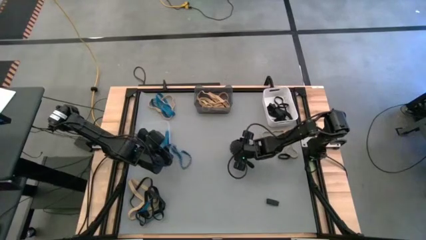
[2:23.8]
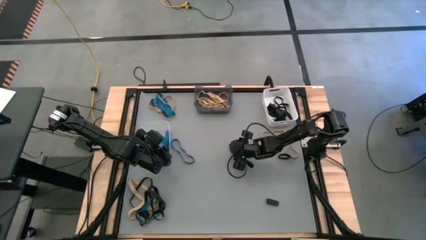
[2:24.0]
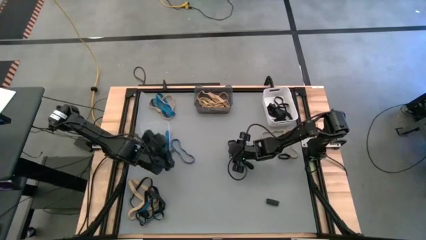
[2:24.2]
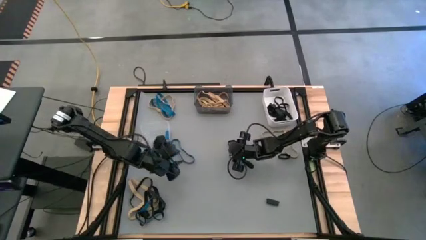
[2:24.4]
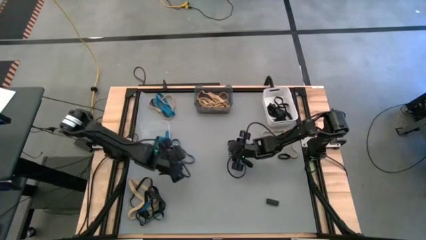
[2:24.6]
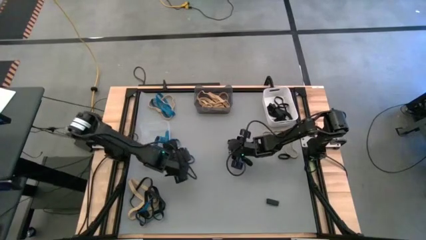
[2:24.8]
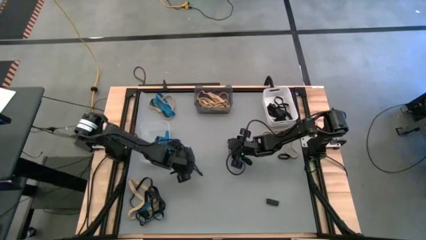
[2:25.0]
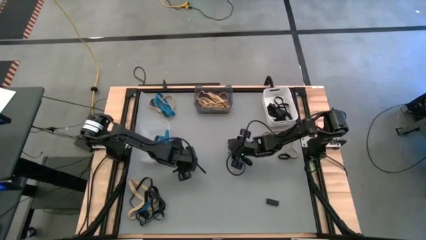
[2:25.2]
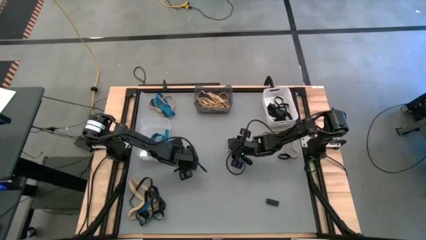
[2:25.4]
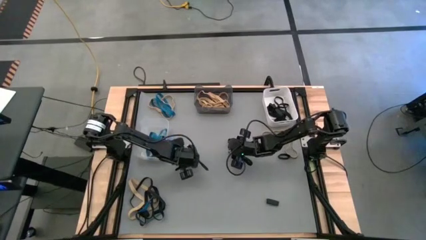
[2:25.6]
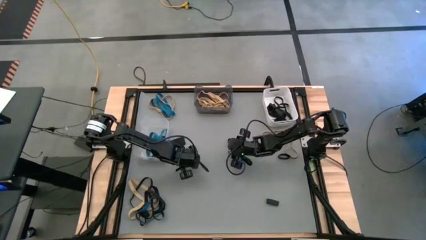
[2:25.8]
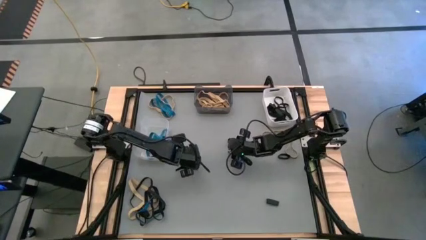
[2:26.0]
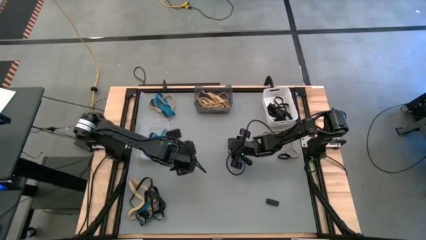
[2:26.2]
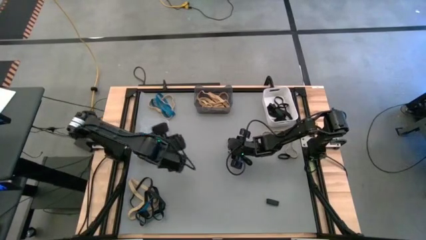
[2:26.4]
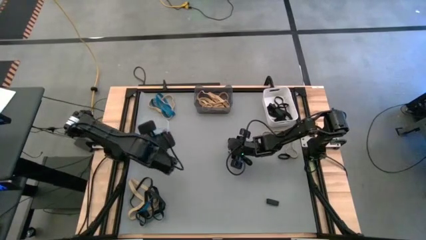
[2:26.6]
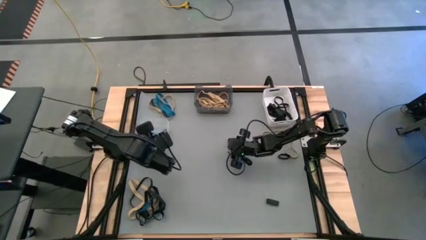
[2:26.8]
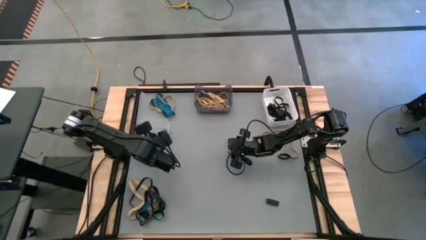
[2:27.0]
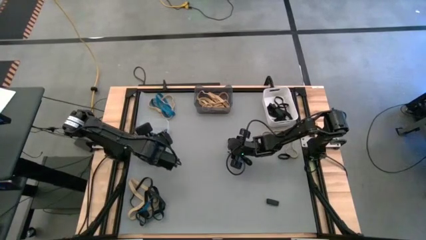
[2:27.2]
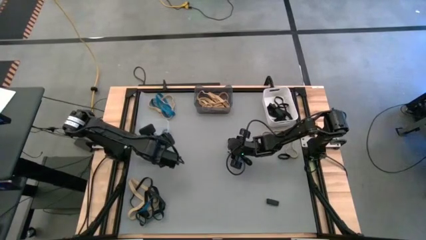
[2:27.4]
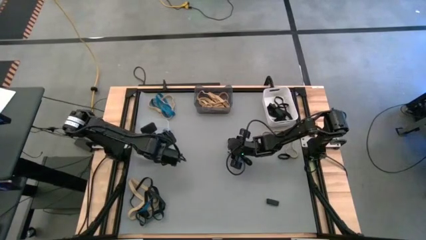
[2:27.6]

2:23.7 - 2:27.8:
Task: Sort rubber bands into baskets
Put the blue rubber band into the transparent bin

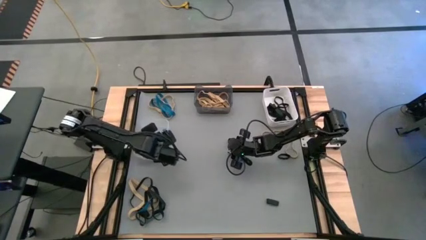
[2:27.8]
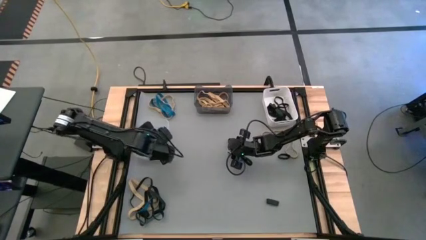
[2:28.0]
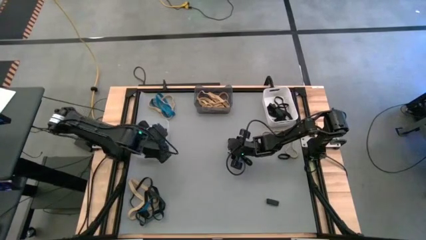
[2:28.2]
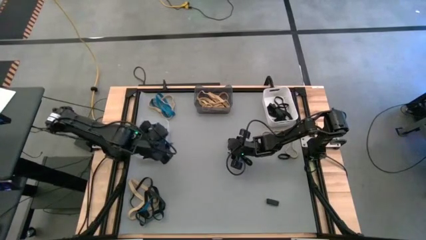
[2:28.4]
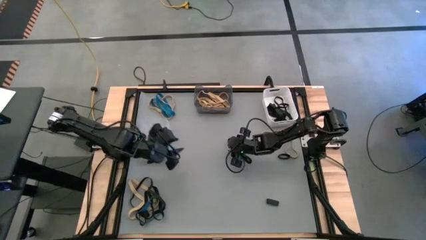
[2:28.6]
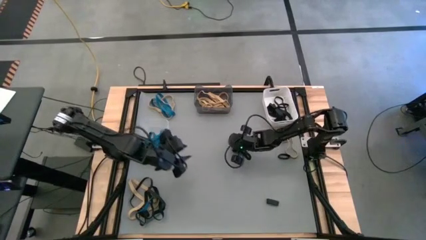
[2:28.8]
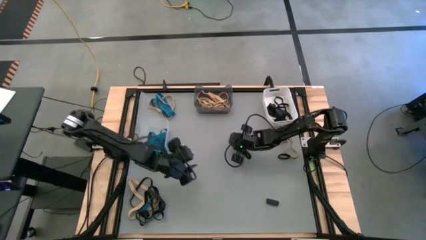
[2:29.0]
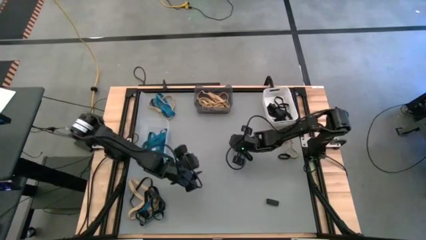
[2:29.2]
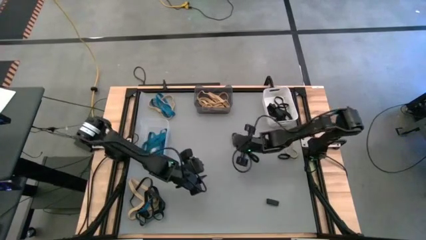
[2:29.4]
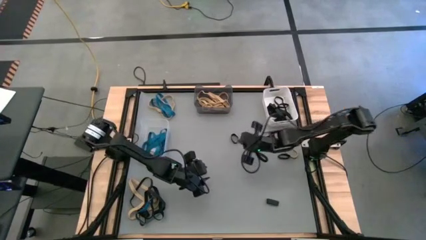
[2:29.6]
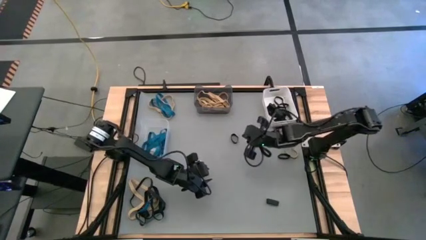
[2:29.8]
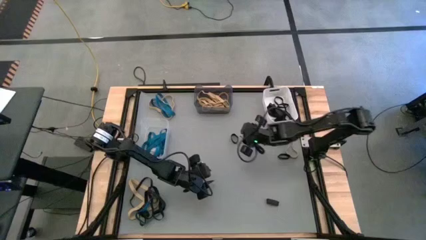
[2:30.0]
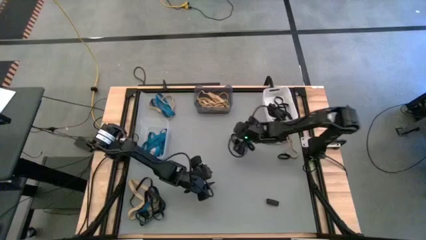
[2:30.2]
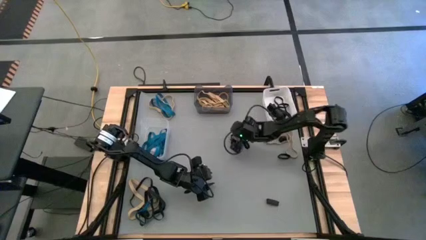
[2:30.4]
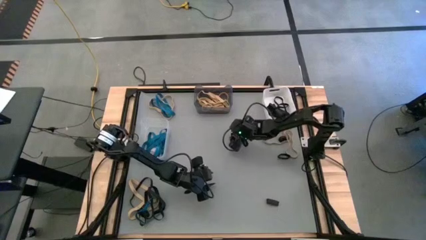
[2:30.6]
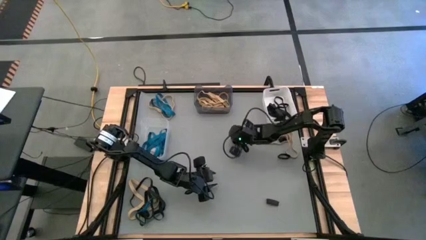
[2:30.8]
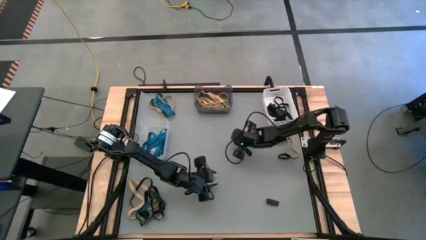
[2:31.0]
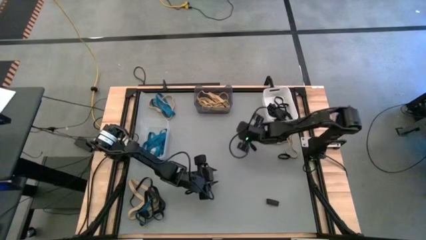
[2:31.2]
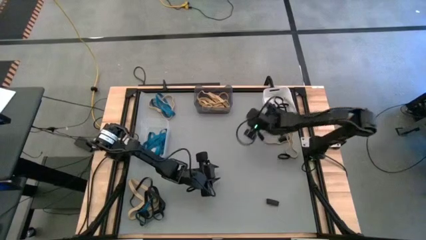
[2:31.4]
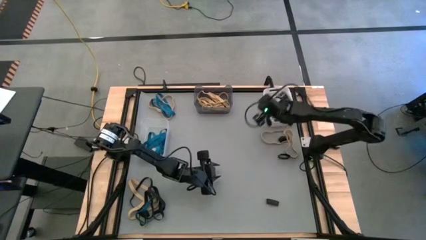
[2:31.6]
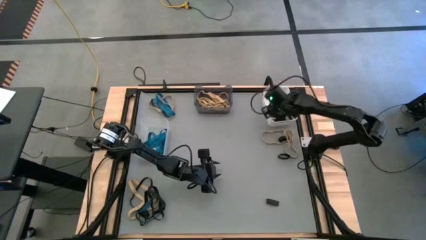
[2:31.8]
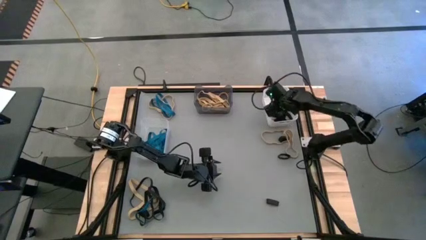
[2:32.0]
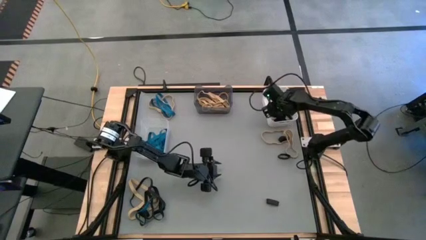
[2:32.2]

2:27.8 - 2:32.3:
Put the black rubber band into the white bin

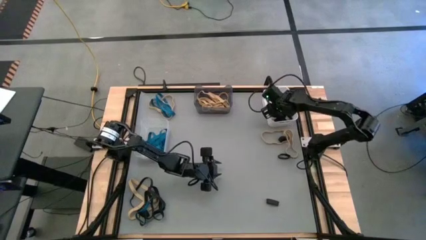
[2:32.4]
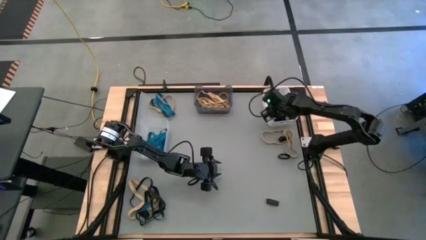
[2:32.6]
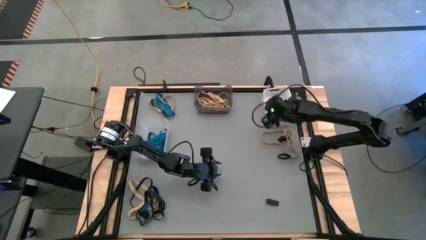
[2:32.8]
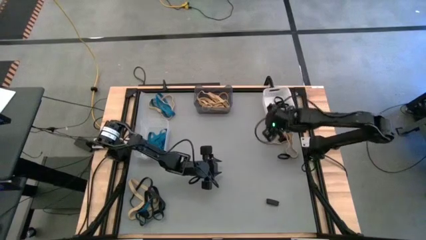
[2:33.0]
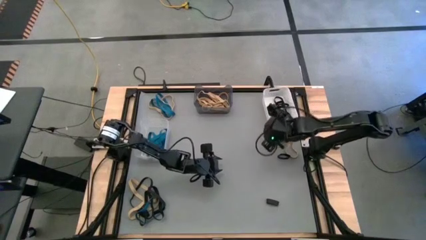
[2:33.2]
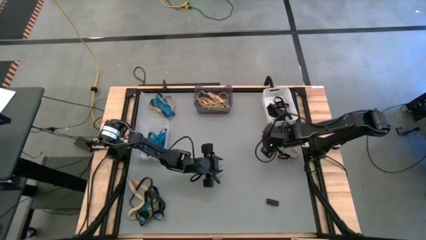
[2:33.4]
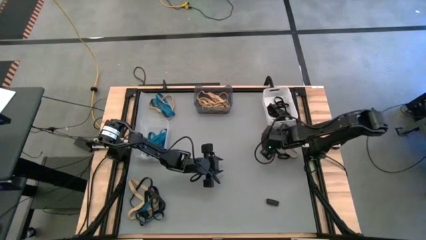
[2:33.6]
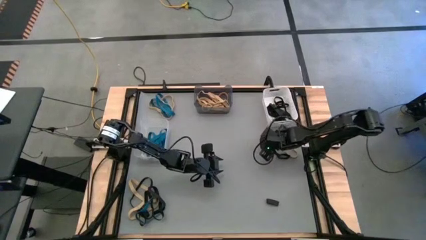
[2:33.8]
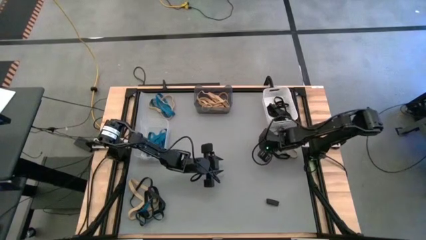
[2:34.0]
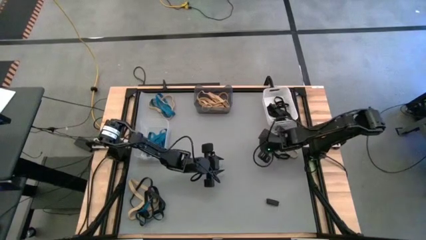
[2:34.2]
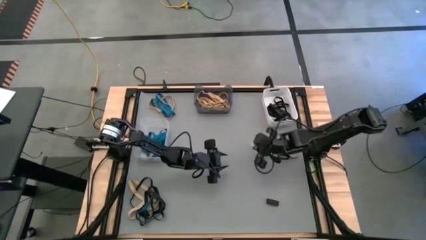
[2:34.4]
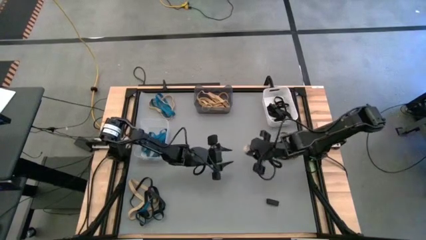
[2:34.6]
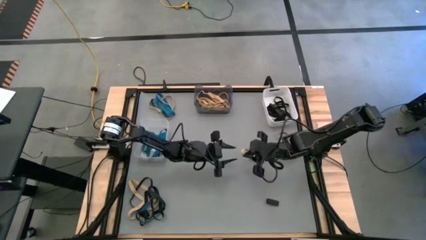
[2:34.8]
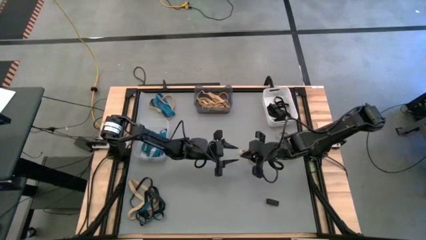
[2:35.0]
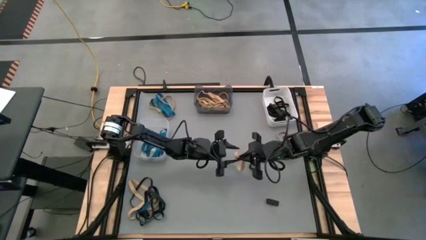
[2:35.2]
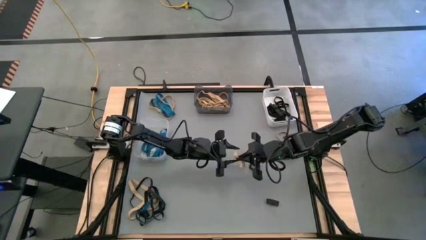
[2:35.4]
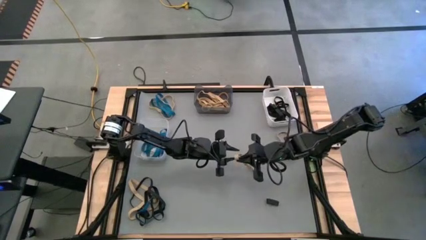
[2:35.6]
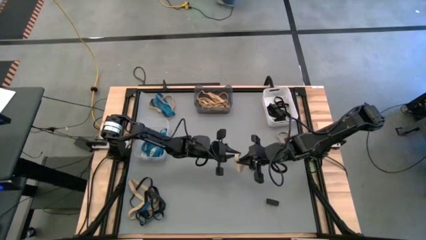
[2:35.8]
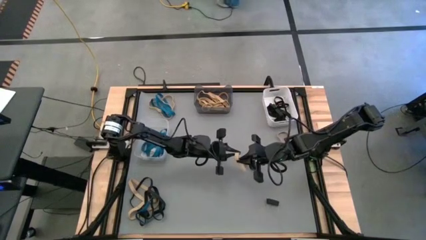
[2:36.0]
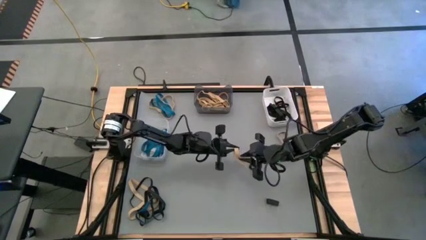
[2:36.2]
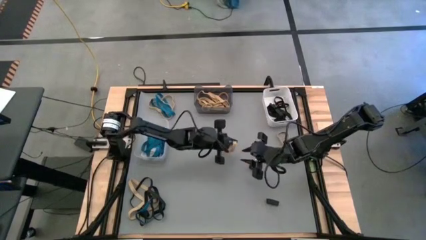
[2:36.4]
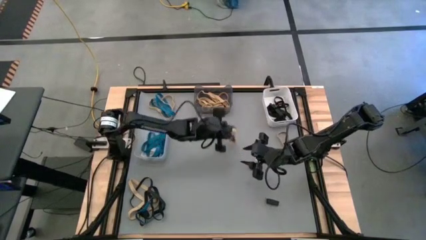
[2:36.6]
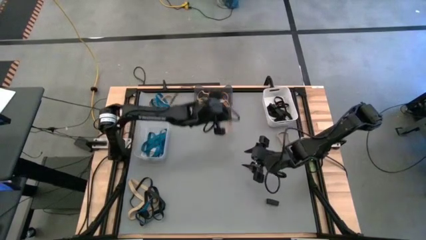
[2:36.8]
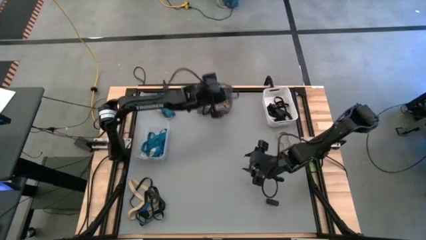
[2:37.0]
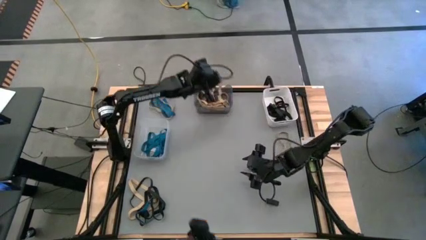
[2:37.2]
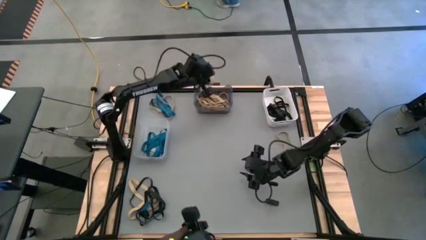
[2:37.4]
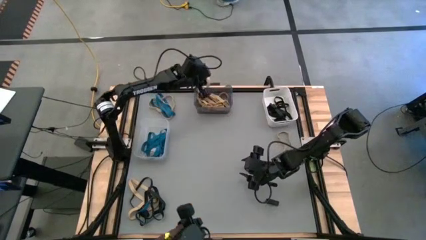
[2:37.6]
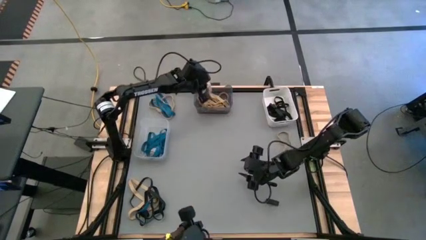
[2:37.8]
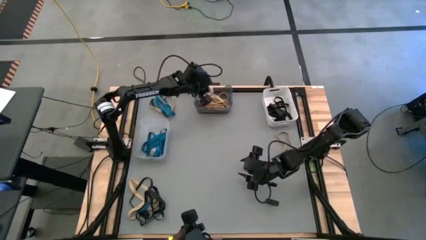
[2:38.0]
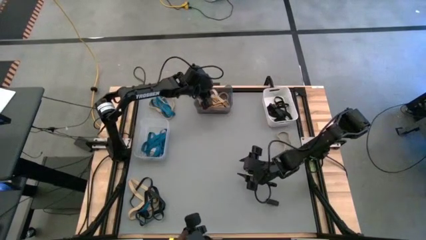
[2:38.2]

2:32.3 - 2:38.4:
Put the brown rubber band into the black bin

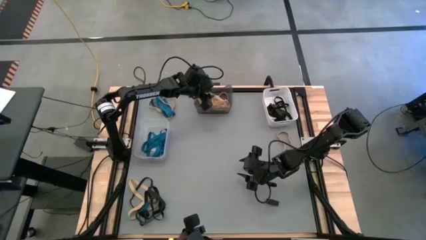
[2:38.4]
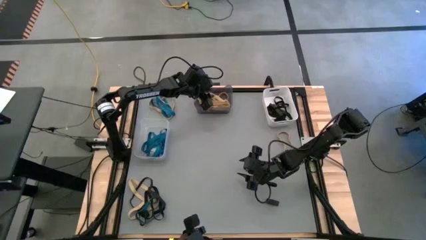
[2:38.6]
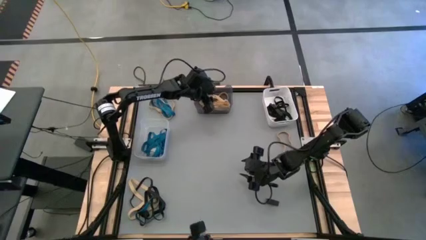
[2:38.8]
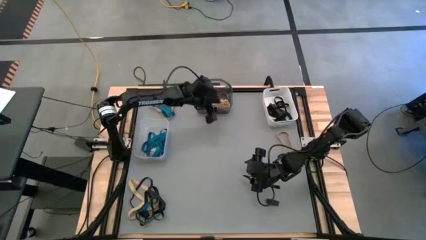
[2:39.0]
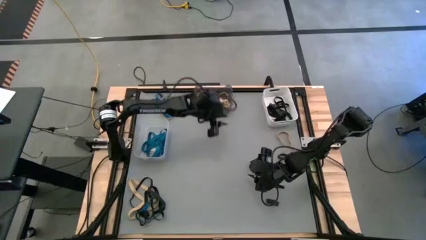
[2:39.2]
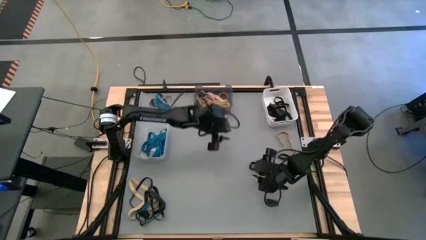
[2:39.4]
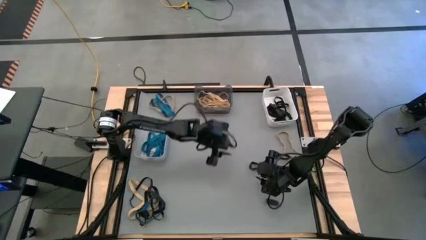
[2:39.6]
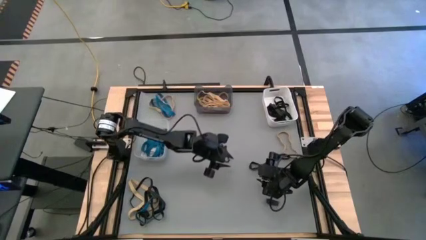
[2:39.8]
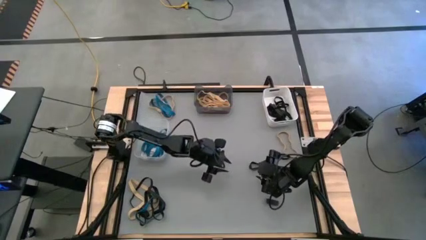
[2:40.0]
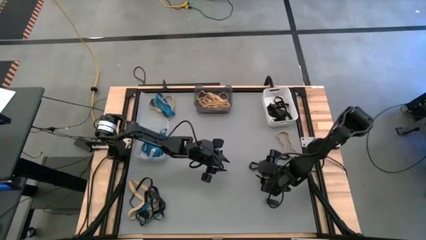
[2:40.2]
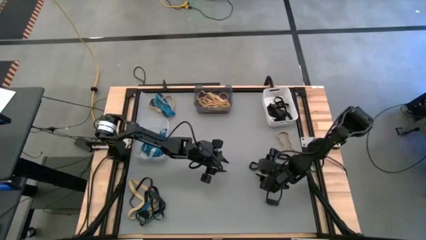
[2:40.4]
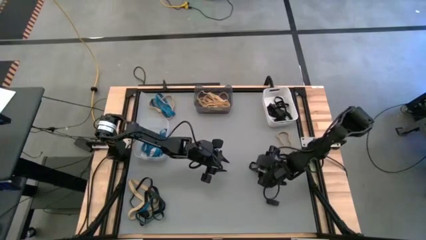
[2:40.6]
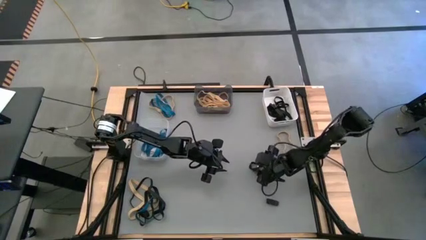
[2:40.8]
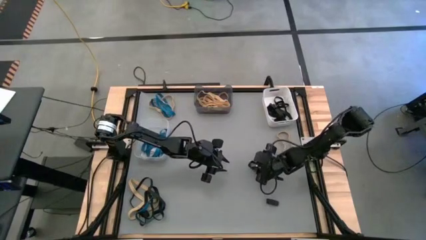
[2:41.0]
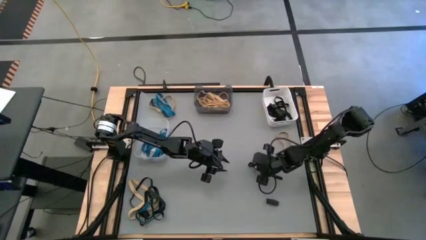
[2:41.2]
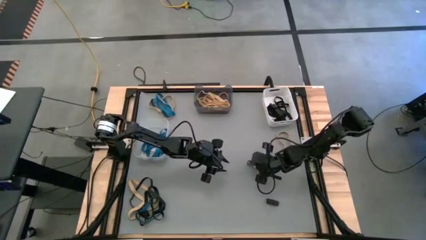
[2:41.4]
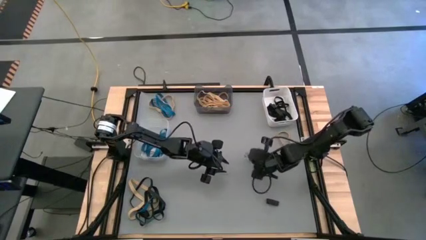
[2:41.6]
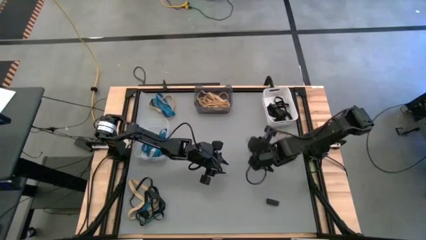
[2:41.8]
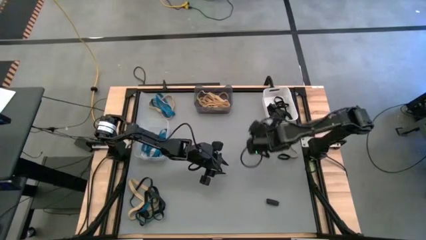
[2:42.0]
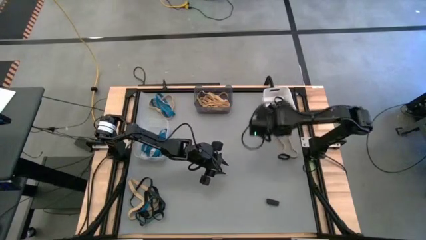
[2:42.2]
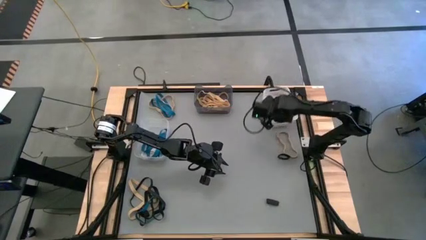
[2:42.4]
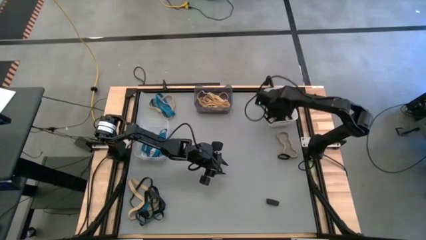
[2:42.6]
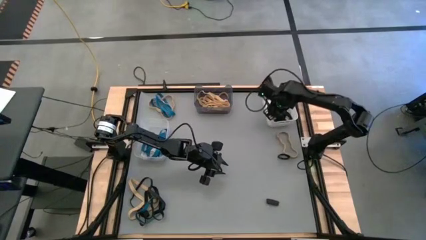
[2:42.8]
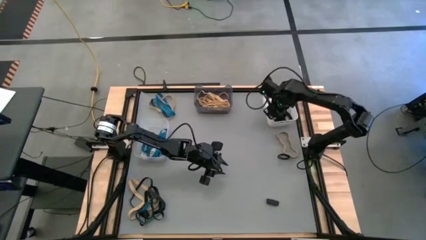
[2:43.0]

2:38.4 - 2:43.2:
Put the black rubber band into the white bin
